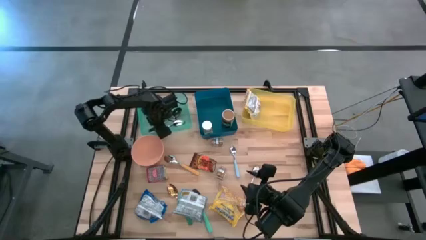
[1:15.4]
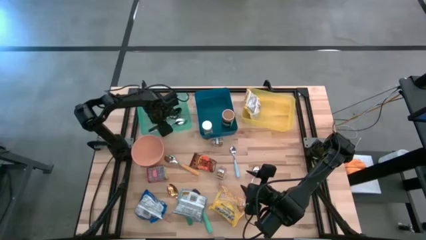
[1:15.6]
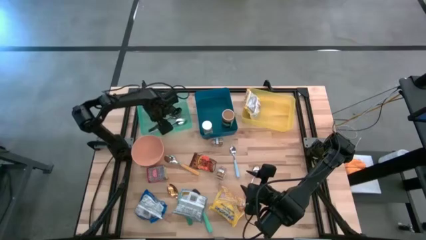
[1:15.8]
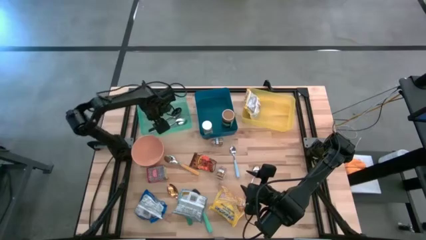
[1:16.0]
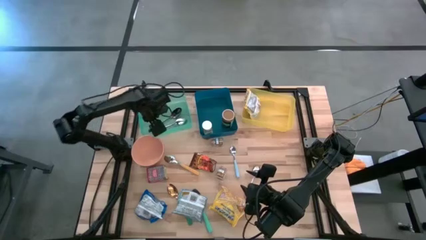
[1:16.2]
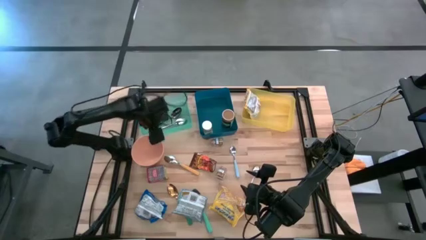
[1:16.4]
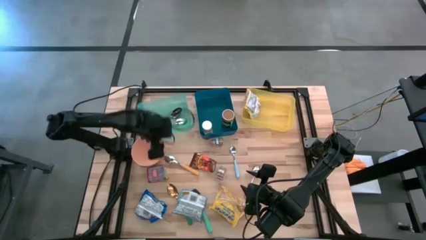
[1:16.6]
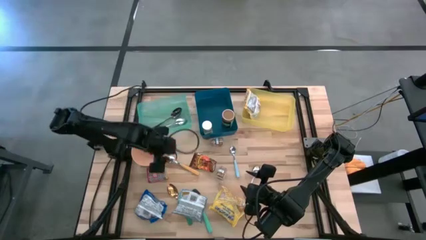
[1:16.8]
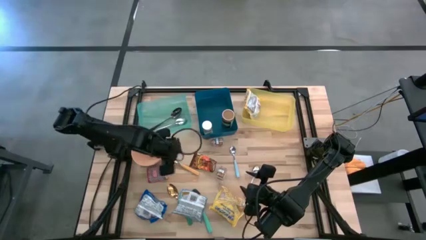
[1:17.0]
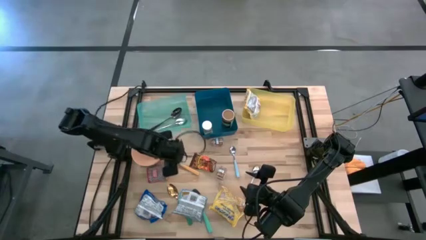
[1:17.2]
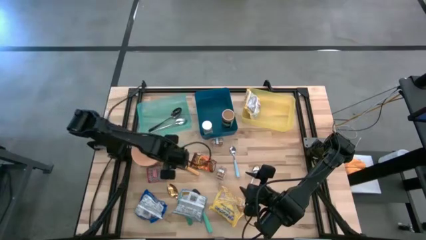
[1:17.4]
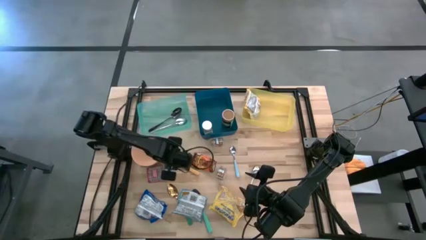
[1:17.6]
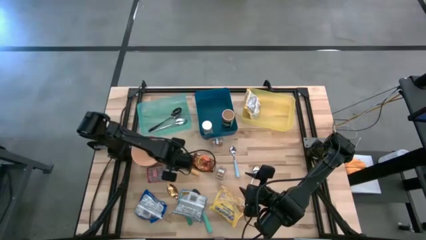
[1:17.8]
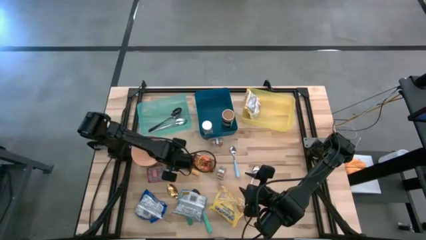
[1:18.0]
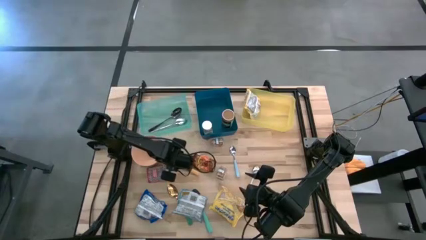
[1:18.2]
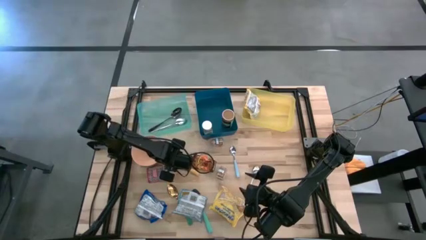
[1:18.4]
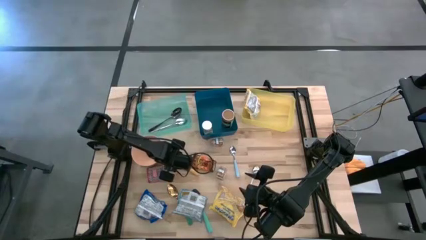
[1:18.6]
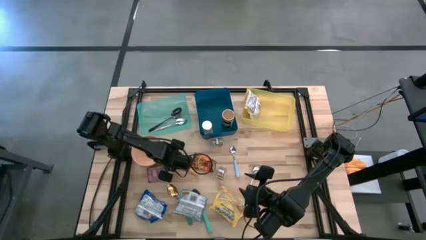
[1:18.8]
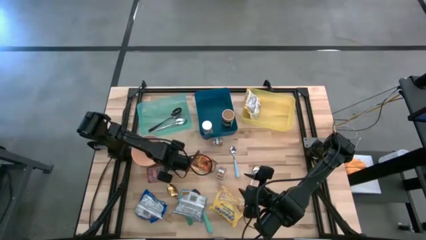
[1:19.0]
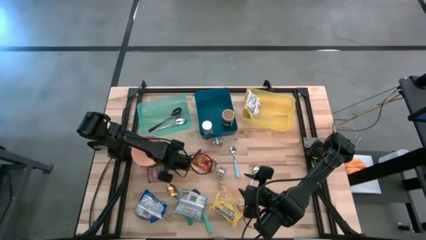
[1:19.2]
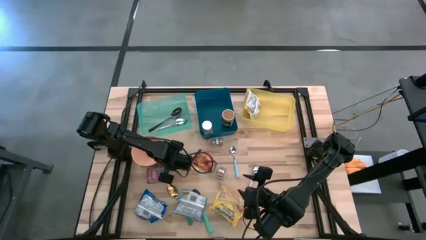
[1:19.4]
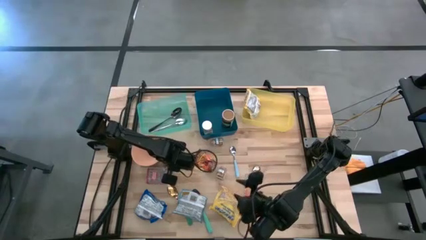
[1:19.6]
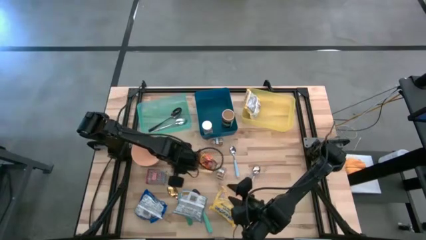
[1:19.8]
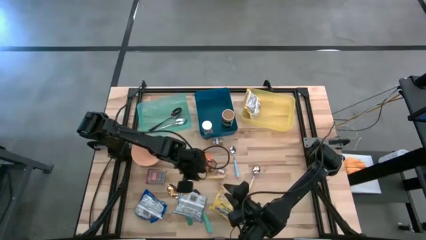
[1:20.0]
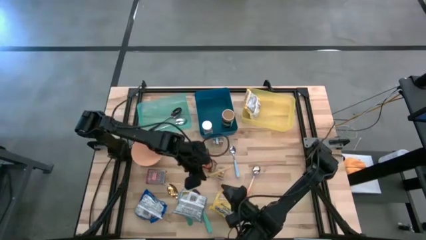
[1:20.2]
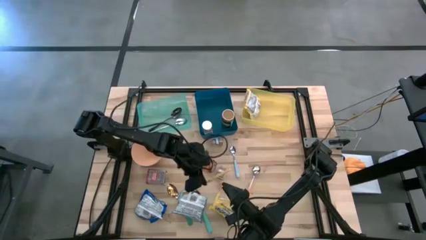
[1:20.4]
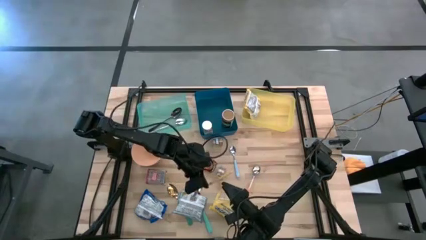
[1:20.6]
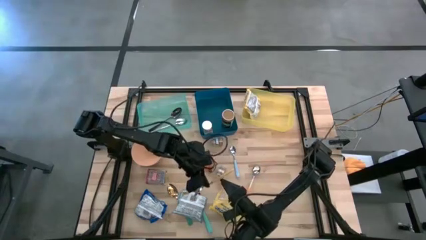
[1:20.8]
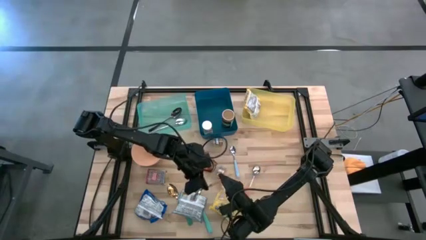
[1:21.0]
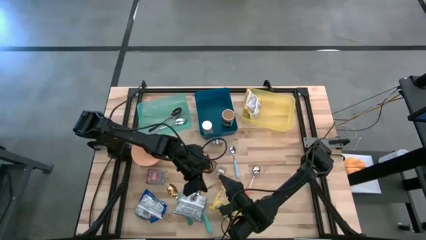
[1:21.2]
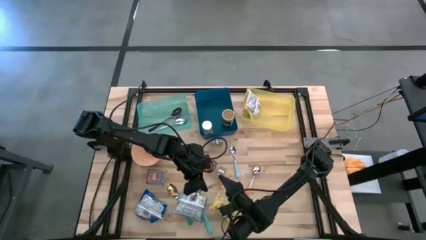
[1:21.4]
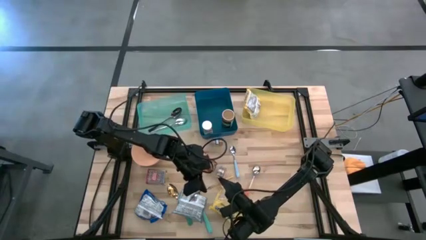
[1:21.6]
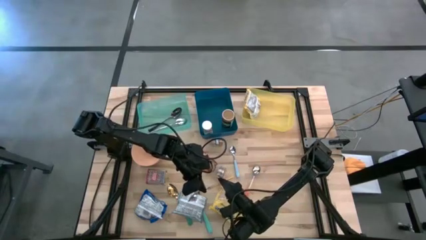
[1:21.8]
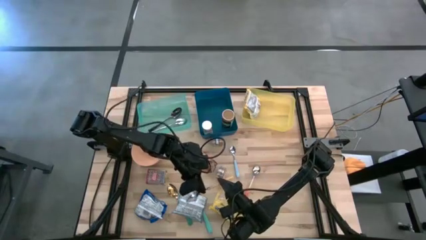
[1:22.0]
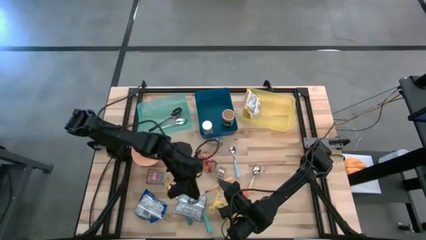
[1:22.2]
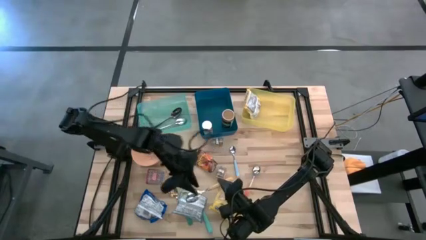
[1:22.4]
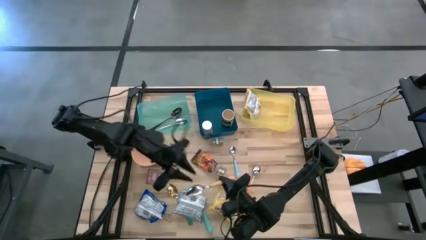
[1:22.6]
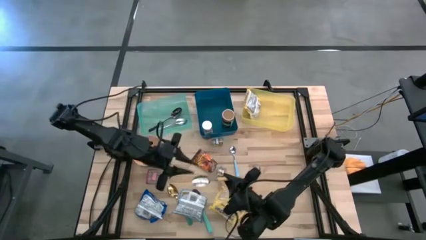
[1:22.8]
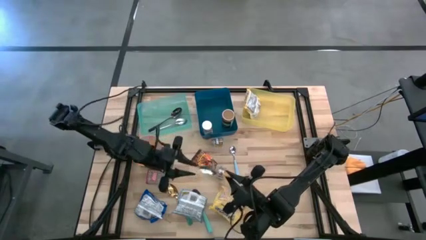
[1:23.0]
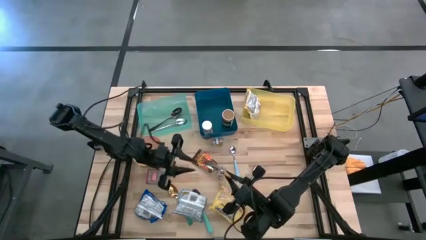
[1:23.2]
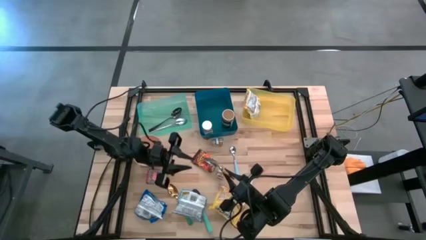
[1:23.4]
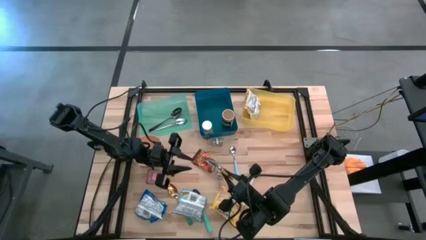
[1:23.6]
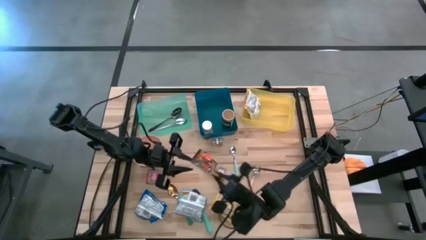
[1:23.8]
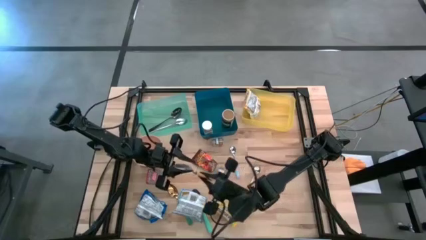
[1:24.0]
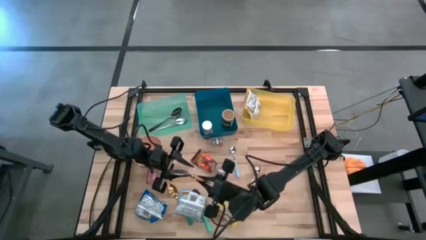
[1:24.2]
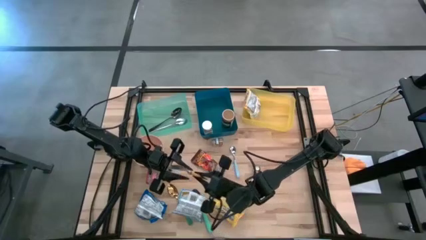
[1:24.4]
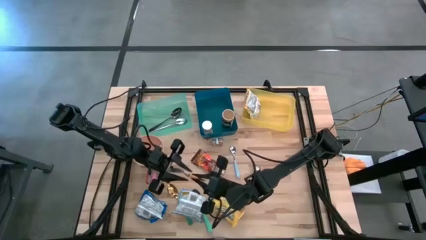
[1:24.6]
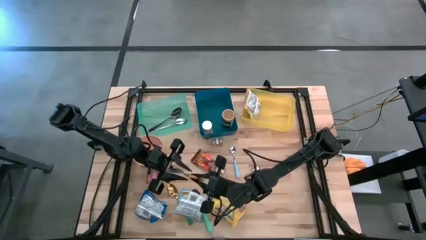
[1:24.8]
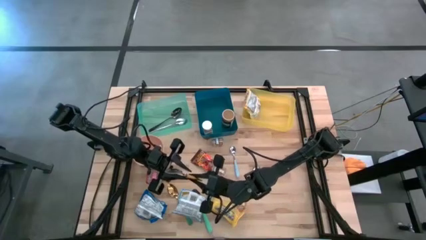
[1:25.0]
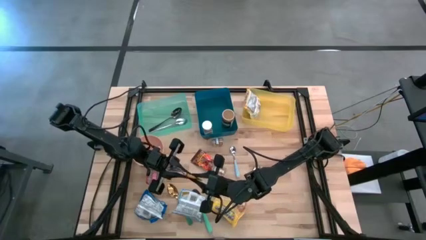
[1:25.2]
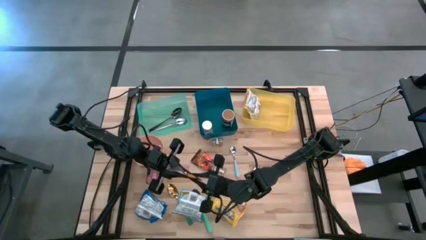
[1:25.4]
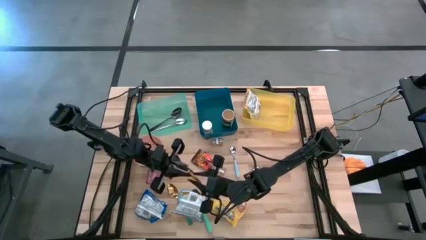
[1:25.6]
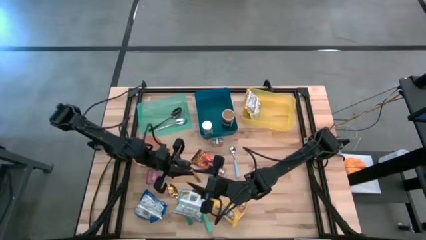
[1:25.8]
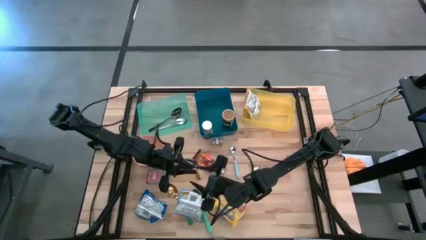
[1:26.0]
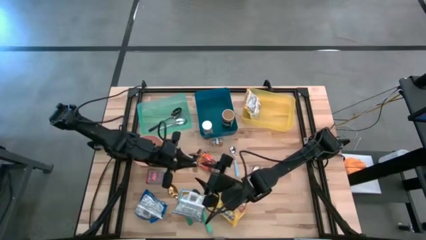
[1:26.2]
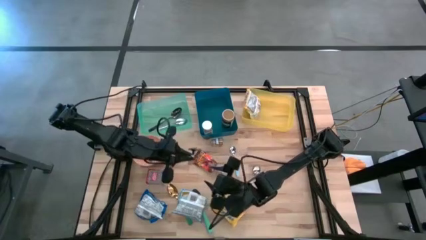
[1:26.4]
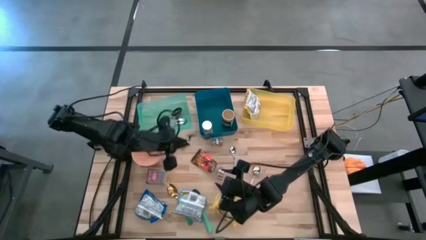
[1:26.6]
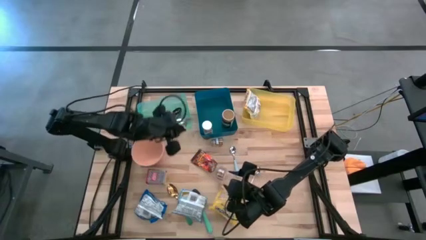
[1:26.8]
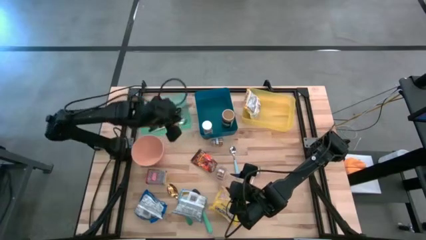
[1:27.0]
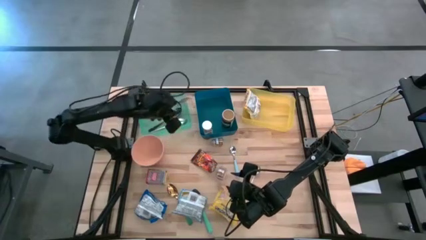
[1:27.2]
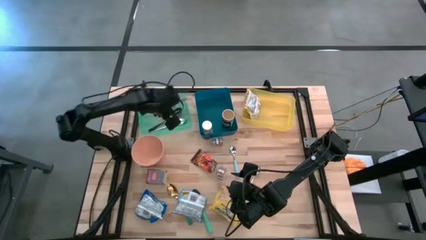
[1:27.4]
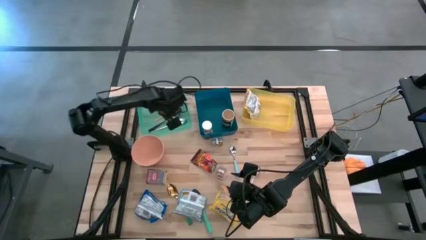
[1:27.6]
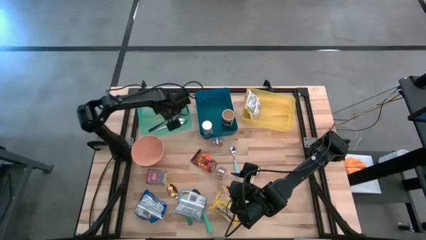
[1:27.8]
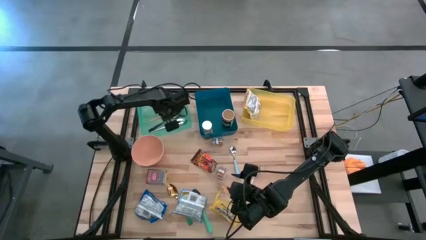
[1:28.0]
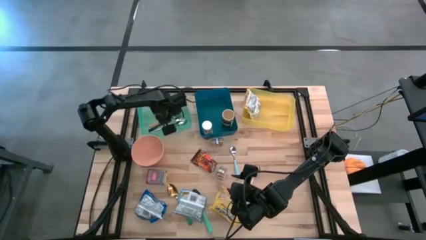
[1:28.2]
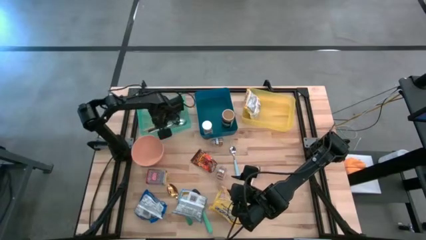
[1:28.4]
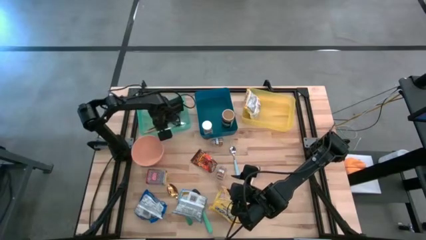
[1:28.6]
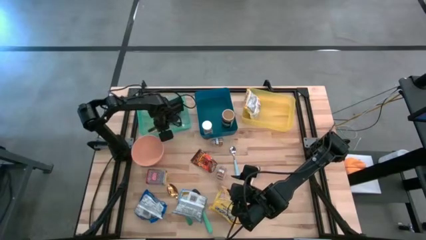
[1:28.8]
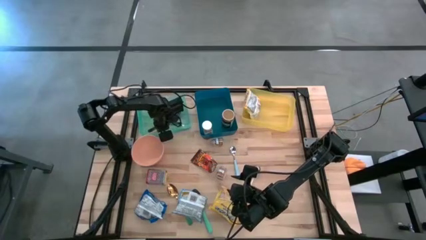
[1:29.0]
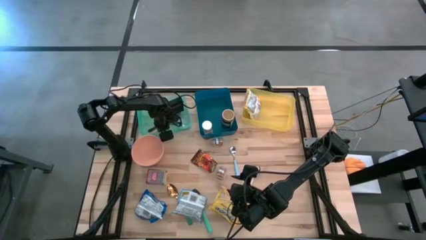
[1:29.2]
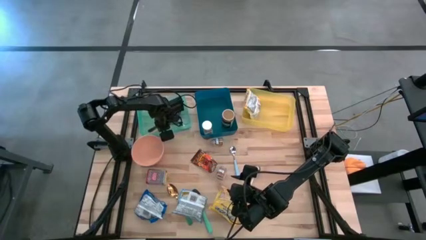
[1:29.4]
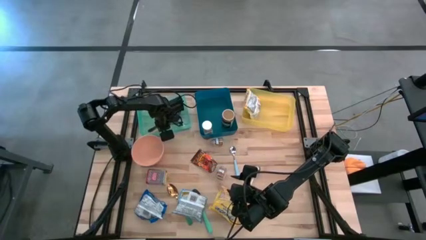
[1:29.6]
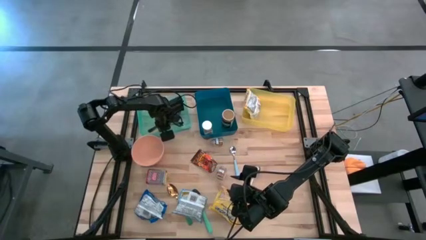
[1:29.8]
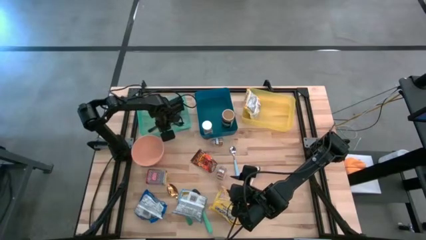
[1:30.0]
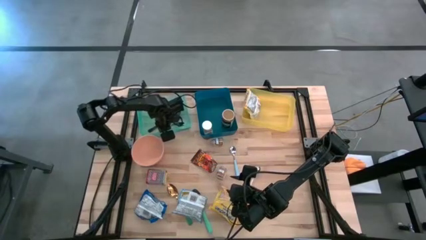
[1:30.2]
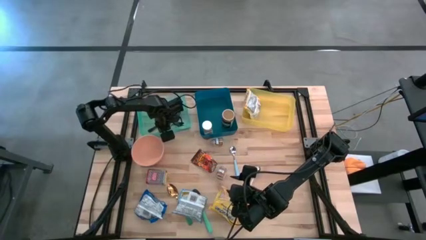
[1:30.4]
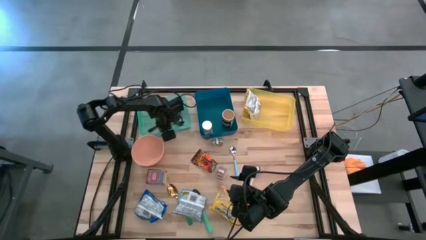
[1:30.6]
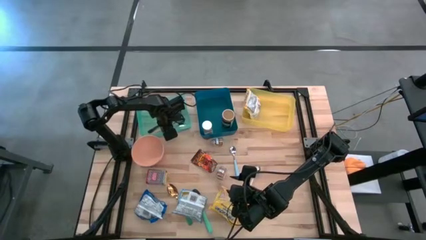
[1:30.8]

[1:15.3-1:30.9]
Put the yellow spoon into the green bin
